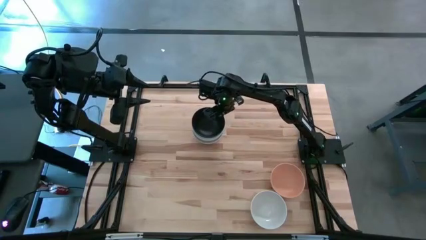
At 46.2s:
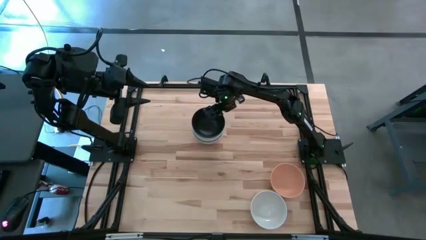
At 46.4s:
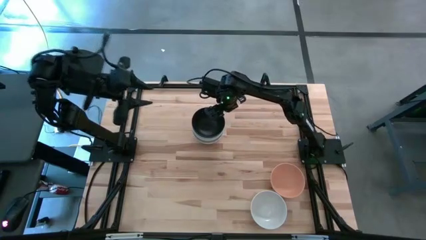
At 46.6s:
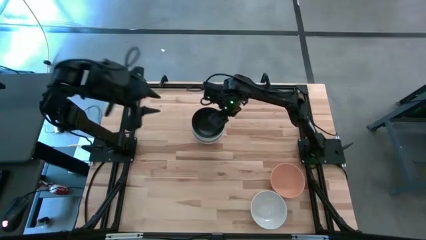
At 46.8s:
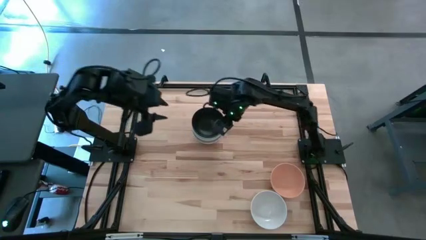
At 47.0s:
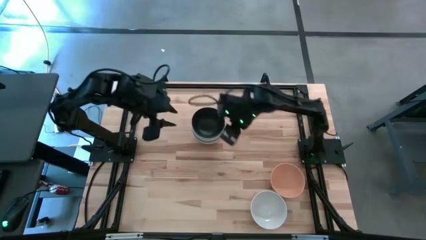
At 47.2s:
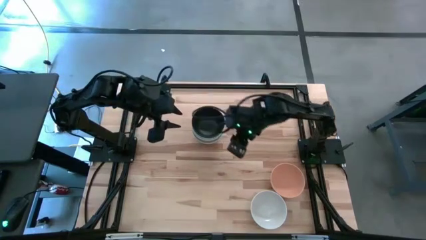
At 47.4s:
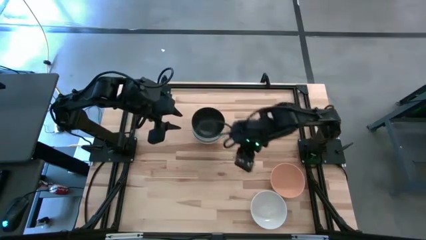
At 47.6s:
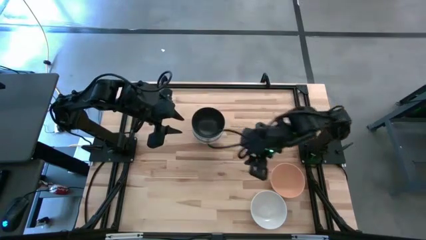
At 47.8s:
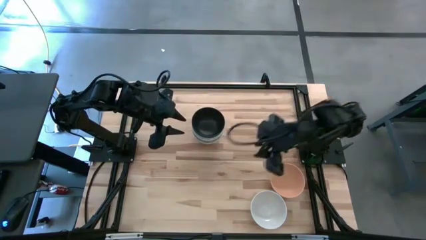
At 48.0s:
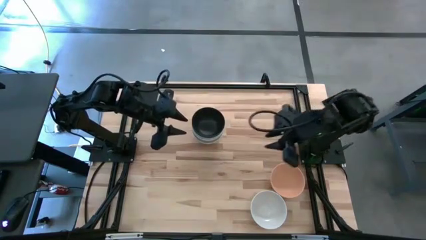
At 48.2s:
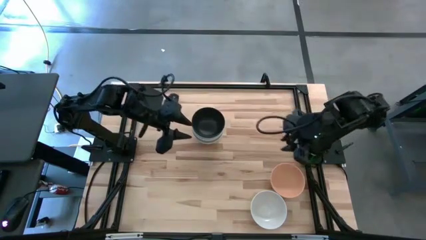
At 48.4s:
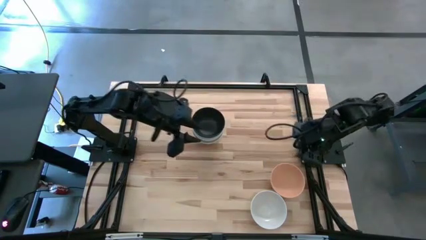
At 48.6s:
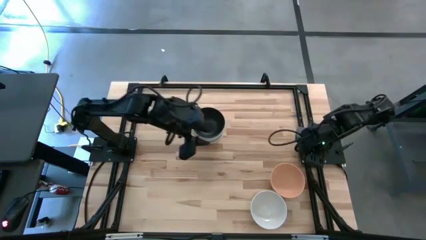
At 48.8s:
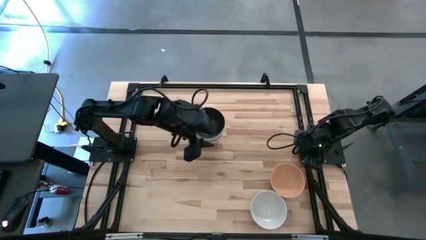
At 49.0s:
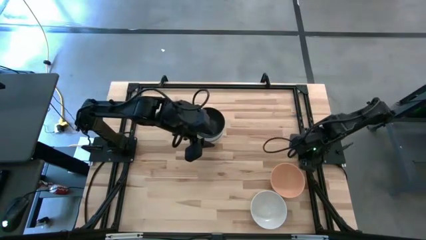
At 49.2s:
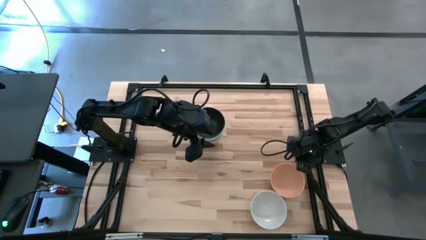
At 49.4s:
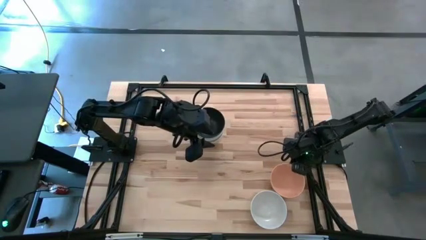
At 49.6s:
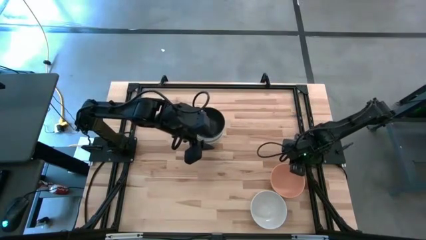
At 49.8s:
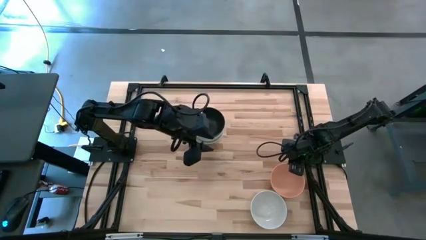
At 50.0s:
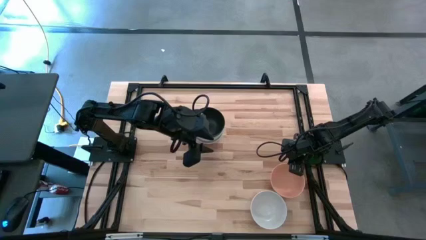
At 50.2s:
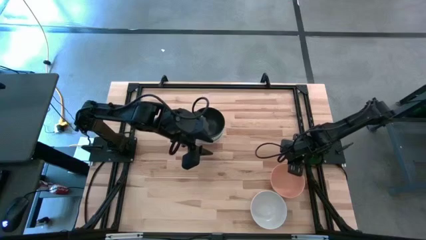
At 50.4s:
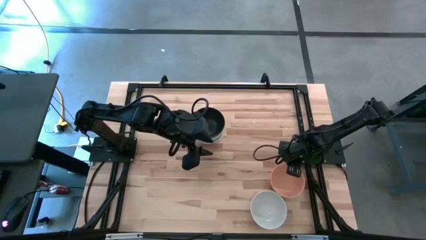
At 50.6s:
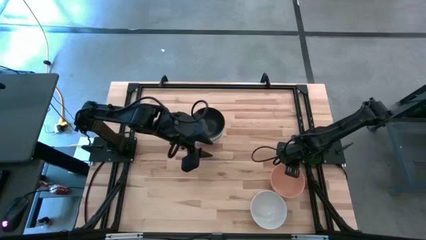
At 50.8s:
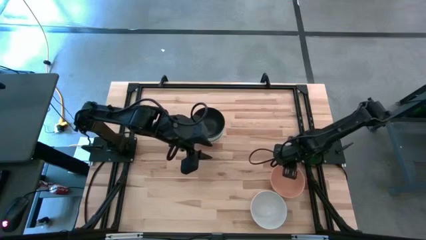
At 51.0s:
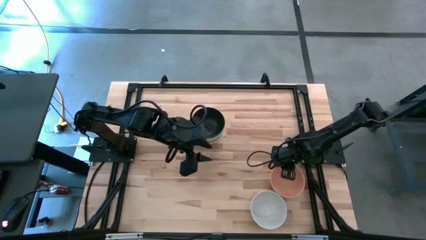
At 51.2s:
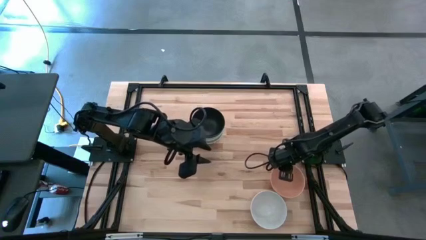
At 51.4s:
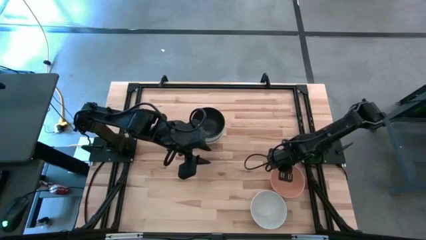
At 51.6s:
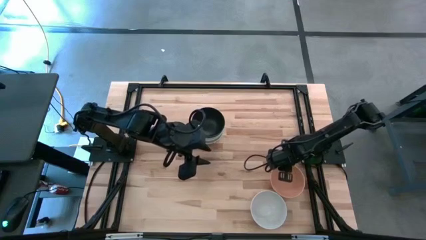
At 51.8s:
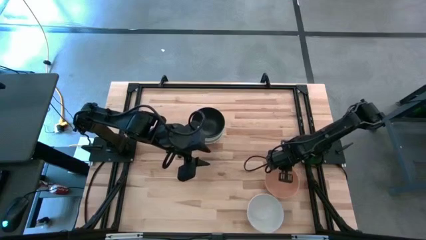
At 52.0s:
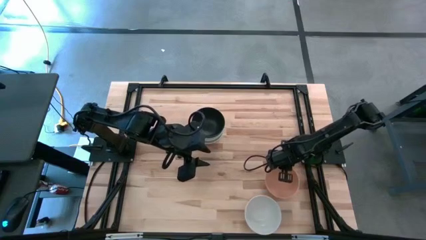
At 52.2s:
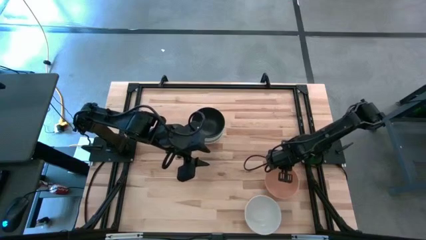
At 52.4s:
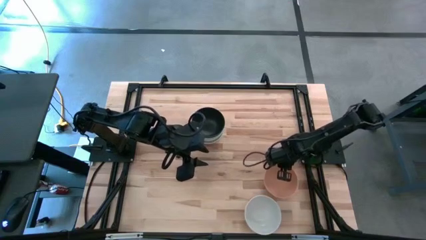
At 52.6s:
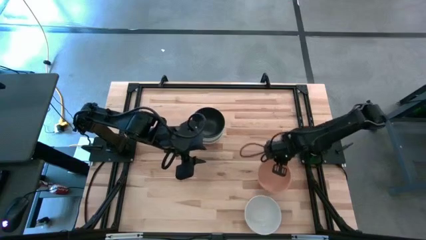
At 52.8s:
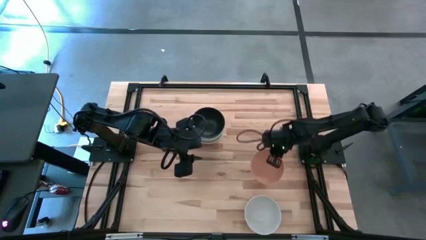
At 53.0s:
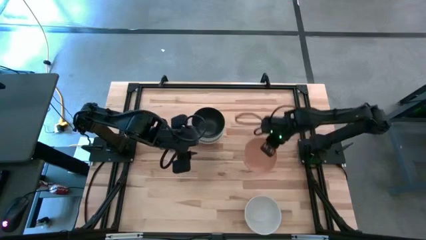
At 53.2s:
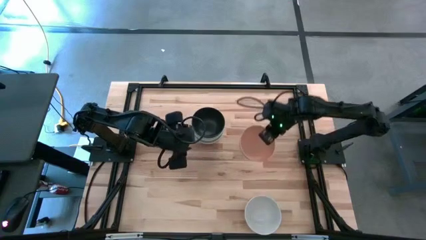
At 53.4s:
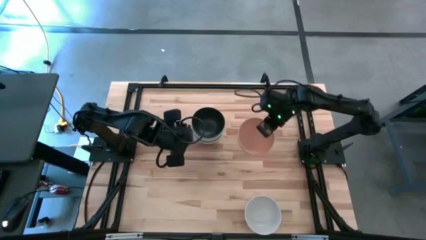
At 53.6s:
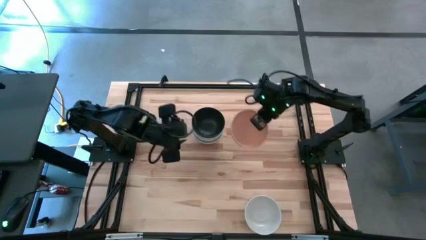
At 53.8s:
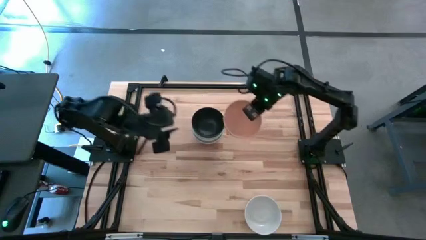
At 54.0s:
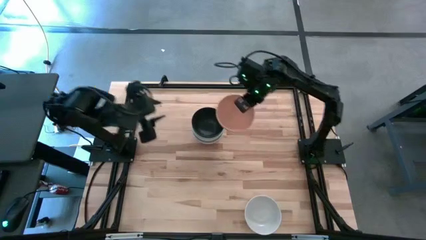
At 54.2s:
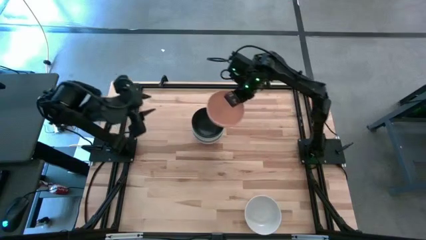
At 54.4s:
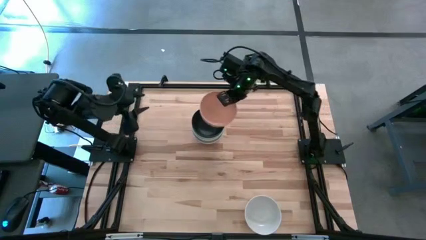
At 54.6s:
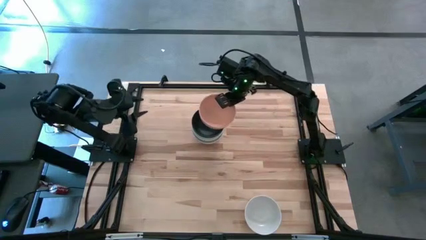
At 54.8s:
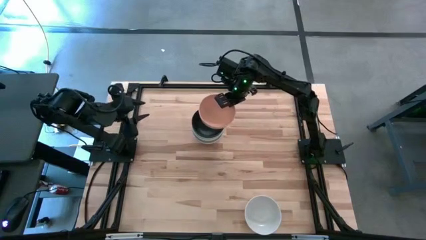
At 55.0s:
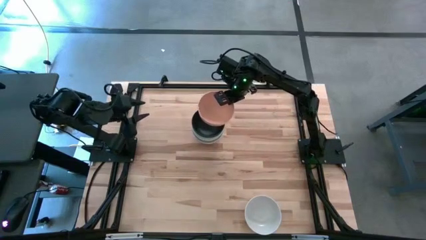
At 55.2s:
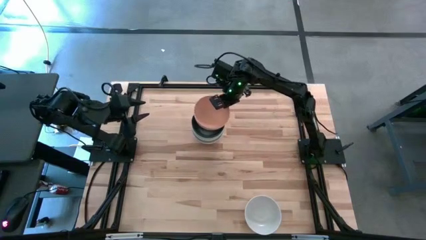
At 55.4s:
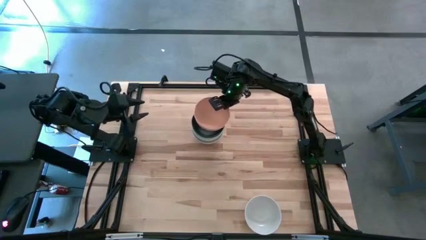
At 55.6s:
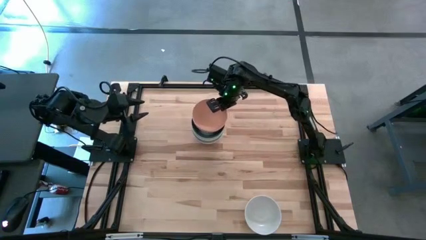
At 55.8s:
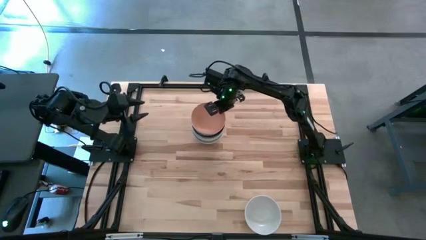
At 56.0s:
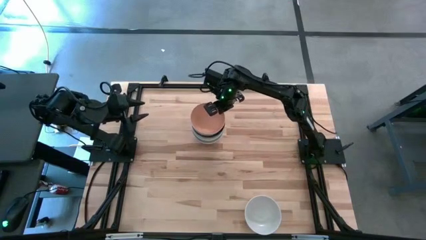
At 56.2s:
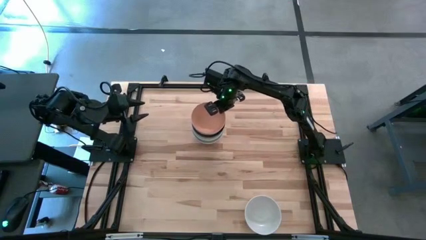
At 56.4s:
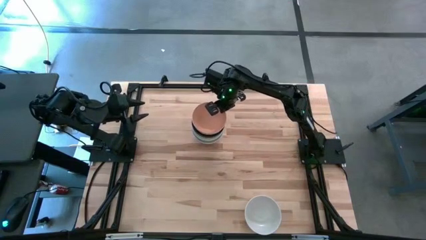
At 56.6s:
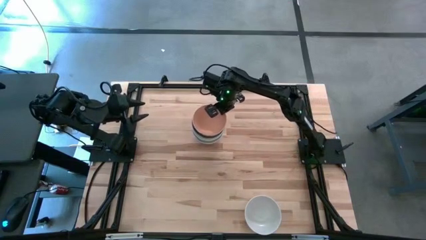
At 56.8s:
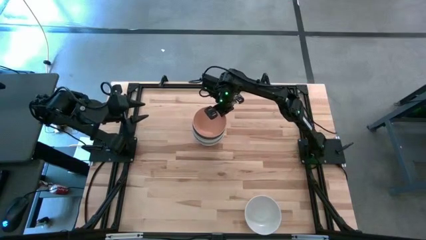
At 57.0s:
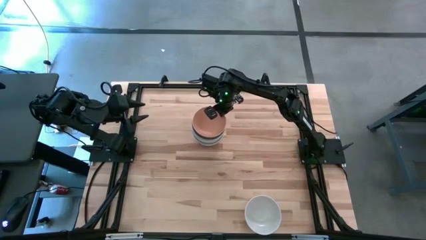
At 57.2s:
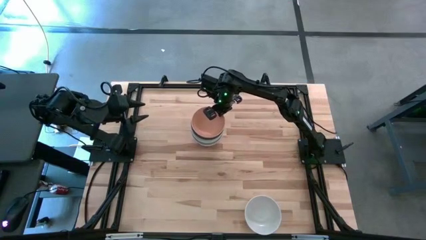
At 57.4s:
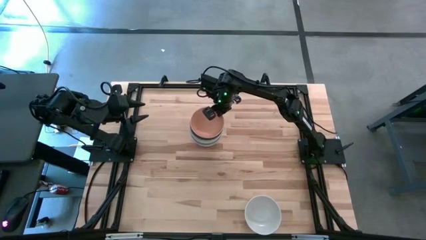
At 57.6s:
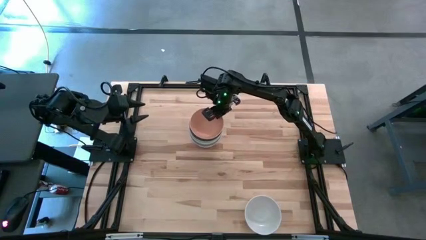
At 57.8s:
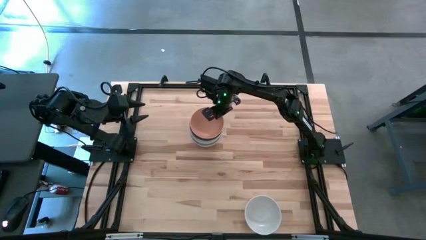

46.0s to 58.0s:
Task: Nest bowls inside each other
Stack the light orange bowl on the black bowl
